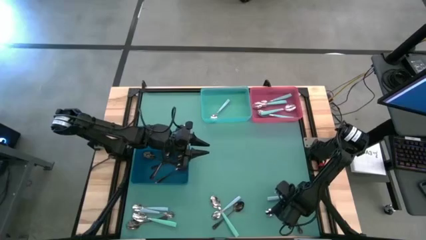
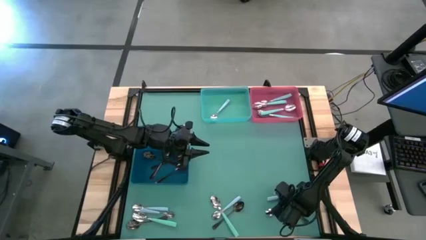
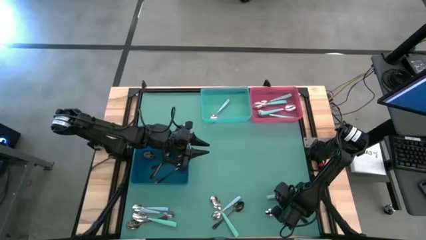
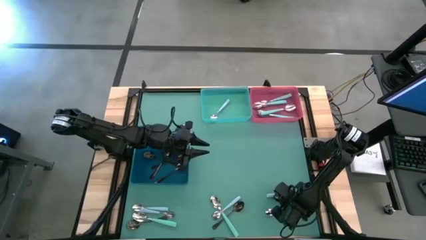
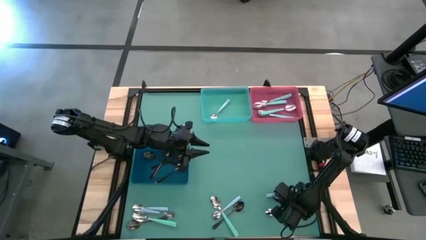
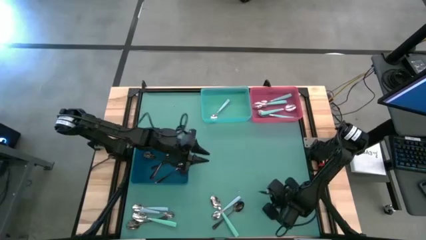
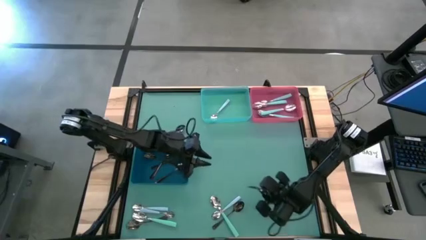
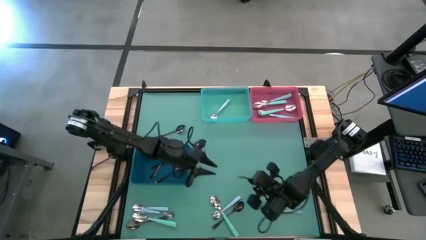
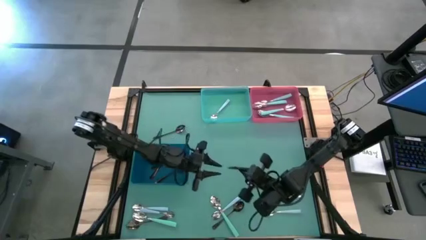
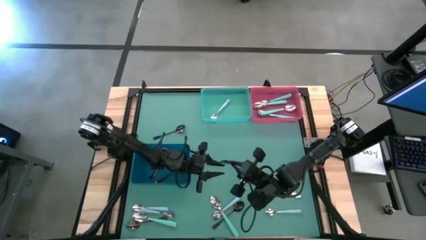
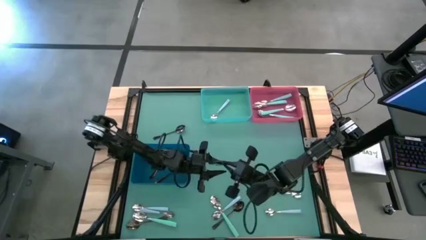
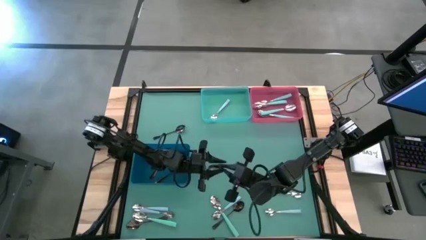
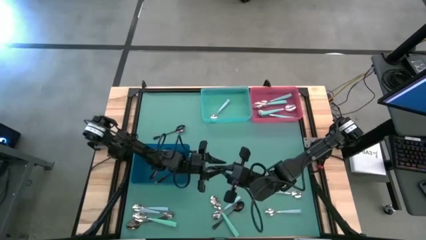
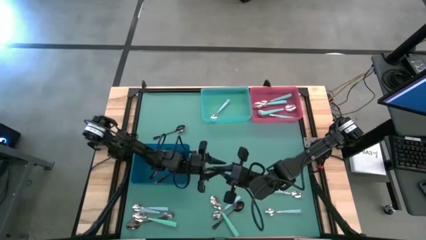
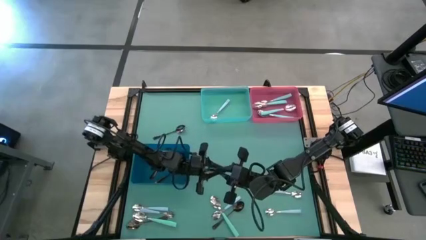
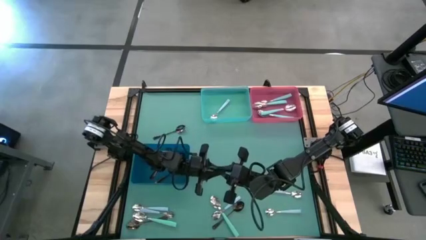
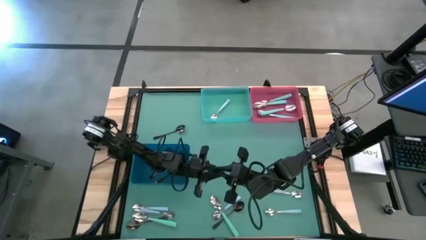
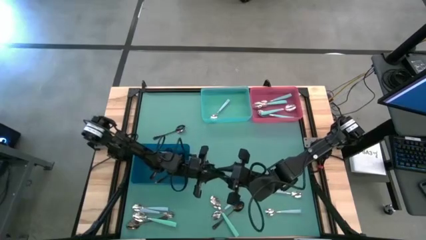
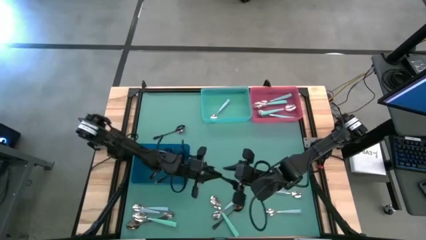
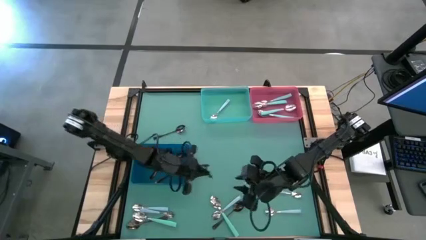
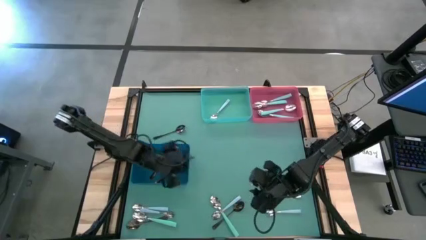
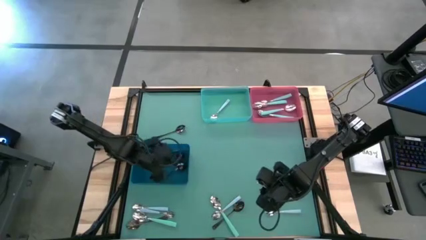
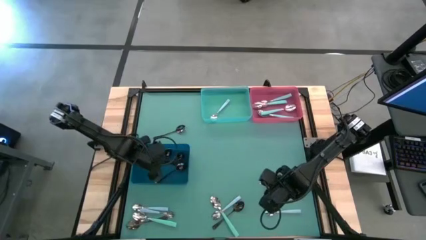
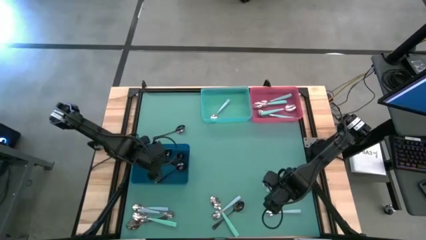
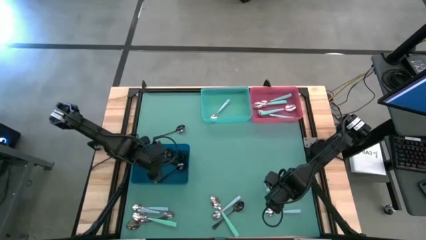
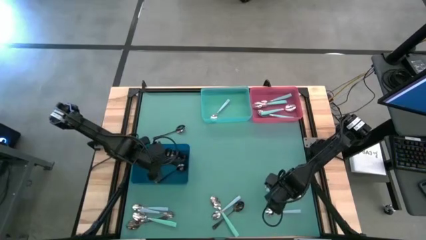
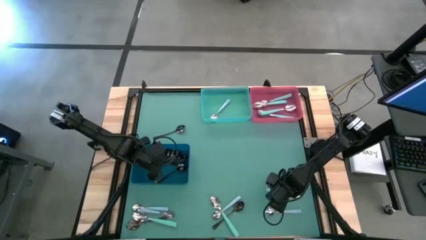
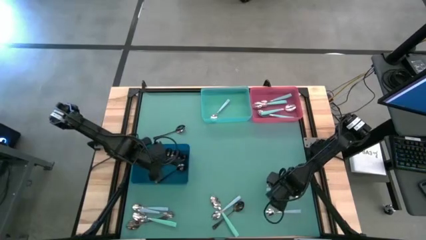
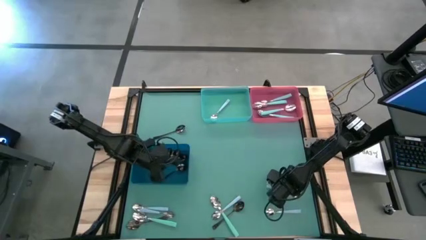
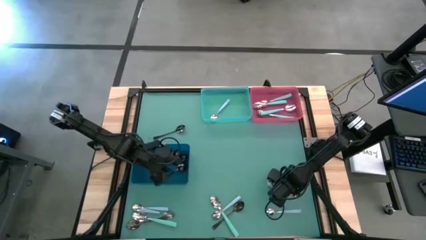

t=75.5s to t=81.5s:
Task: Sort silverware by color (type)
Put the bottom right black spoon into the dark blue bin

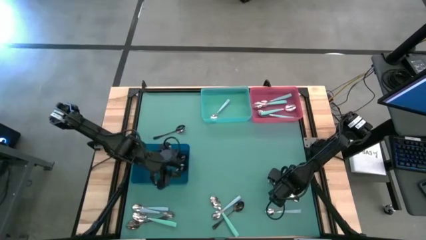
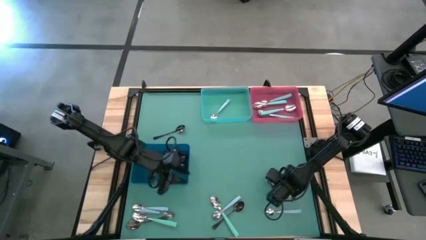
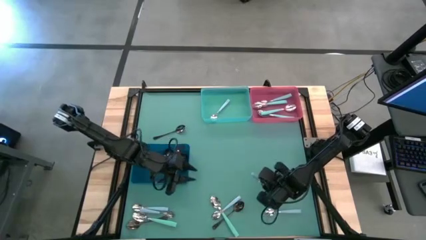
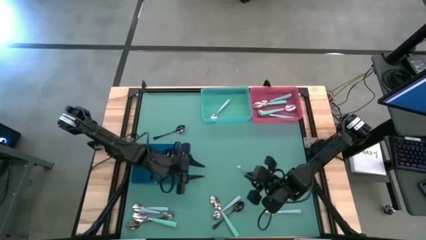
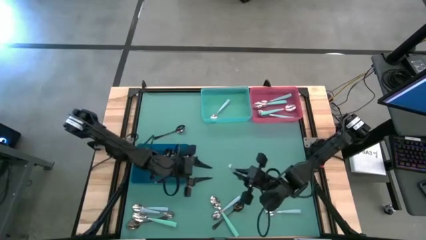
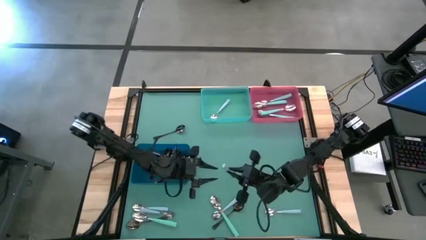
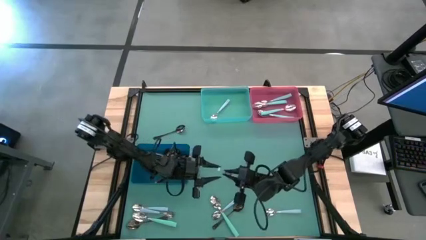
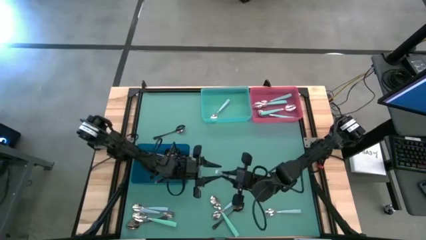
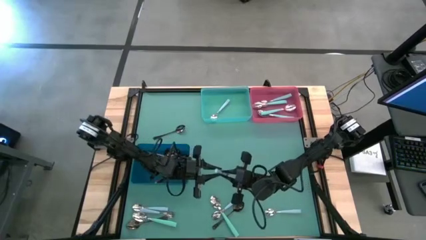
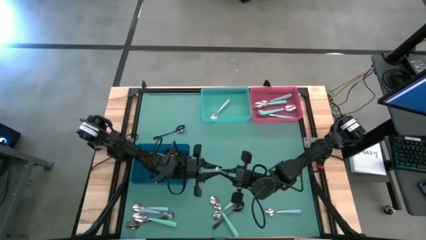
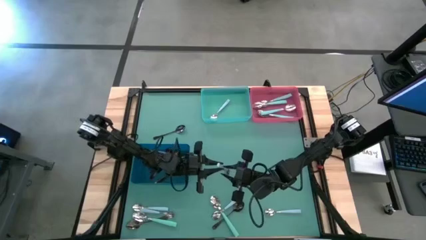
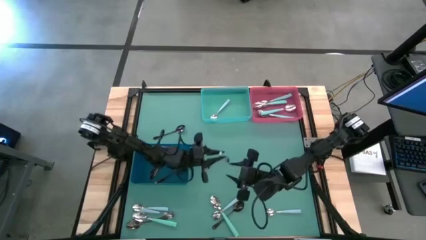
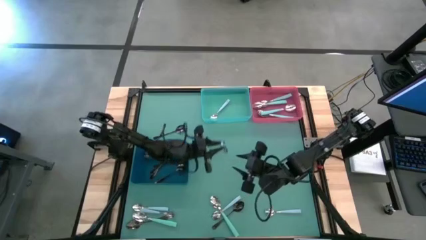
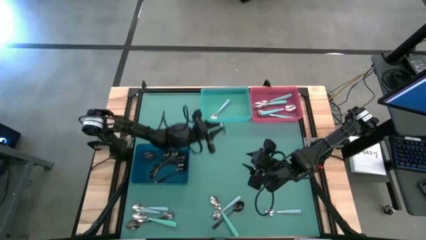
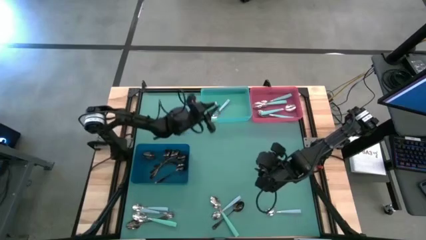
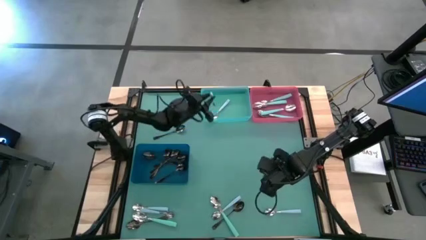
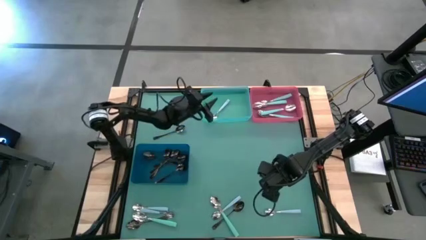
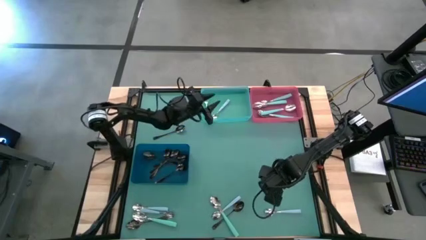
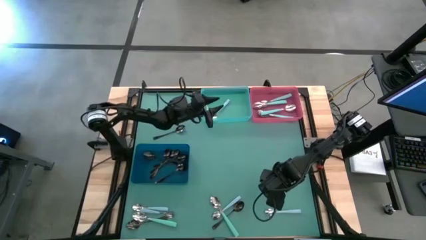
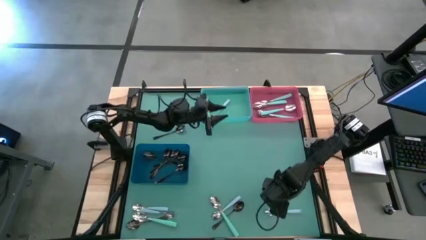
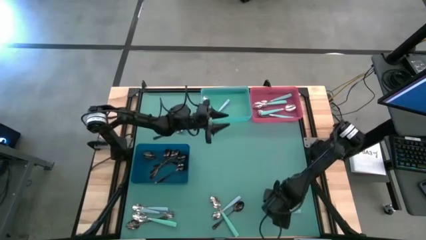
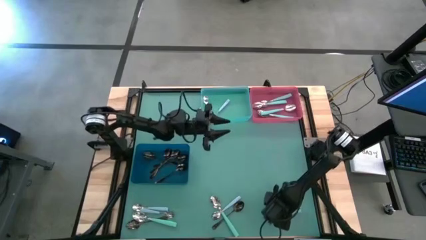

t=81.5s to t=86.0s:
Put the bottom right blue spoon into the light blue bin

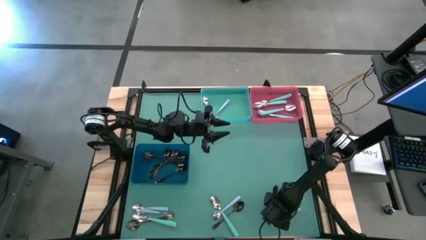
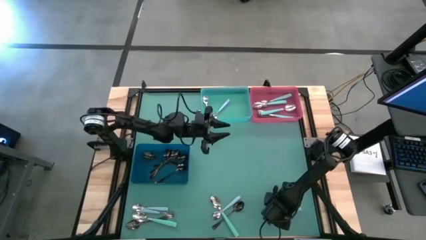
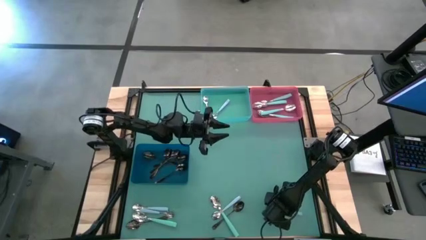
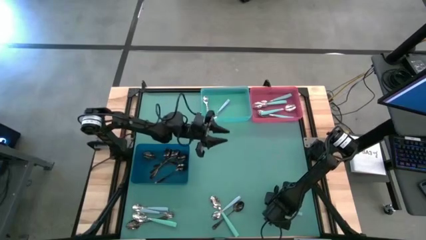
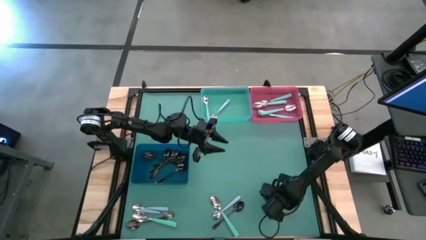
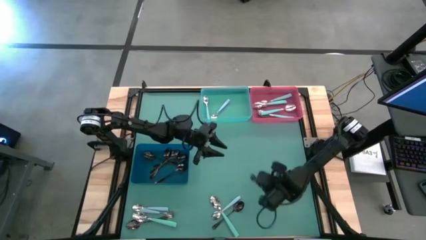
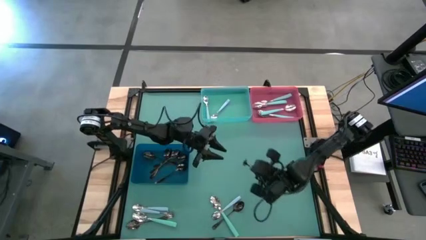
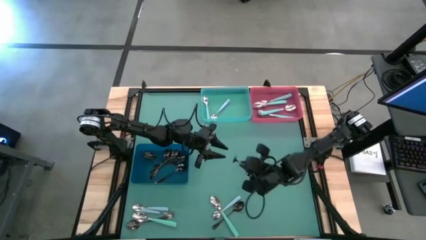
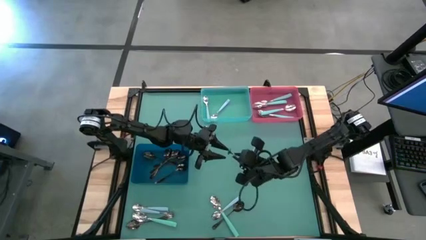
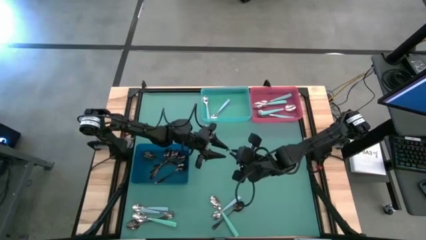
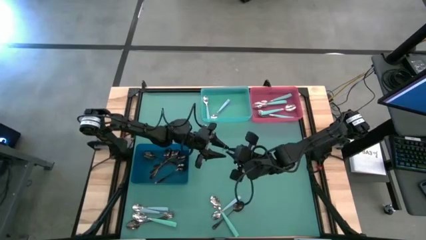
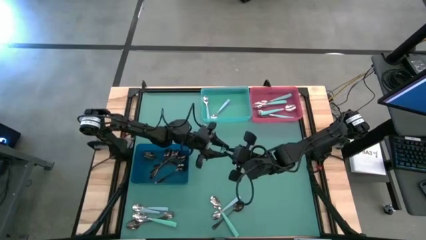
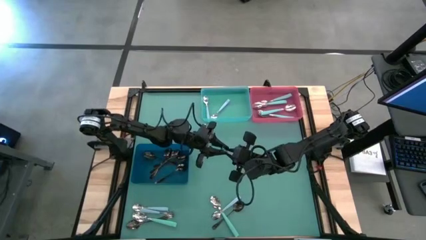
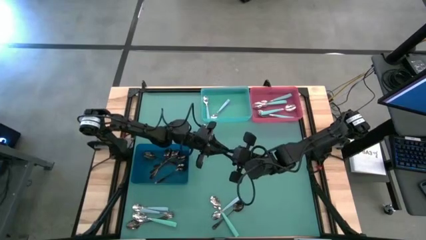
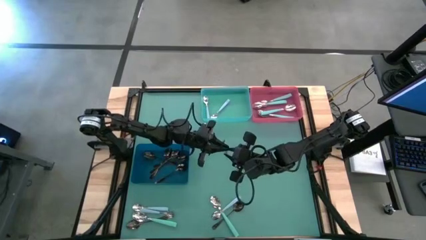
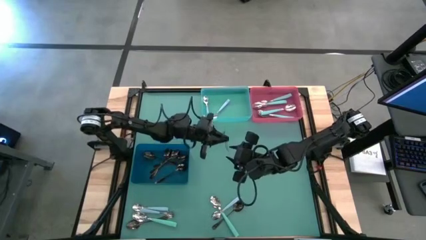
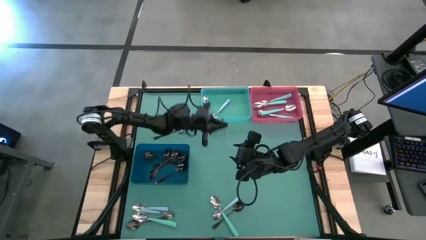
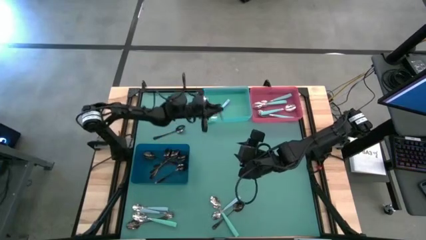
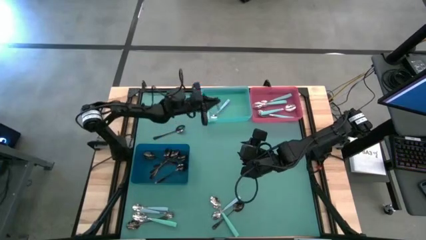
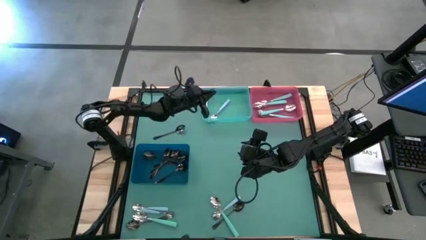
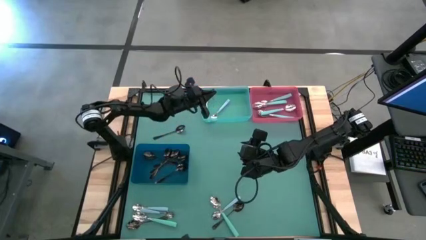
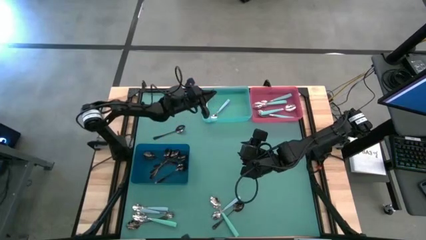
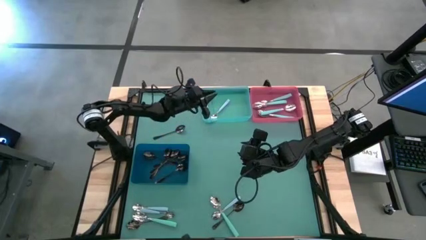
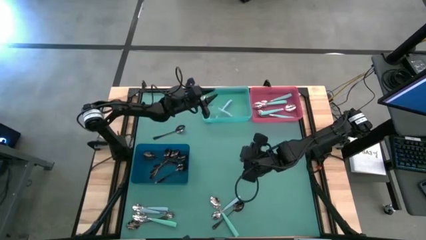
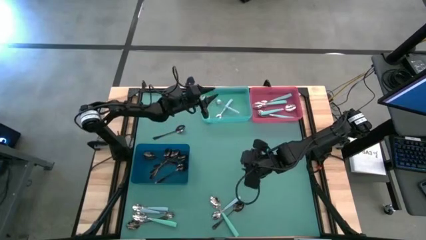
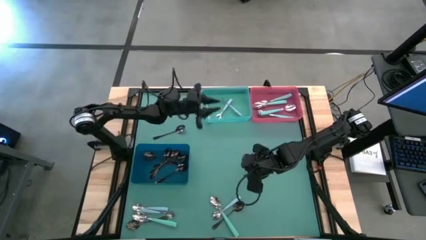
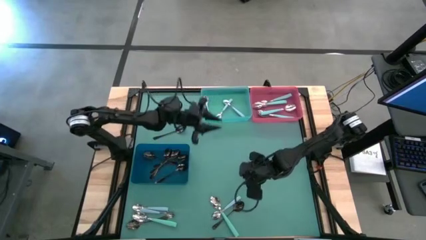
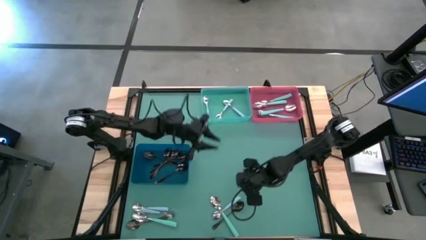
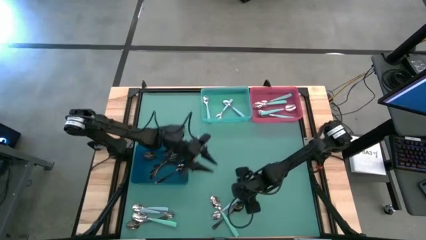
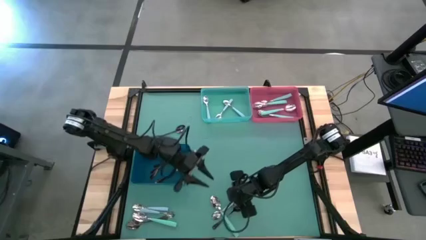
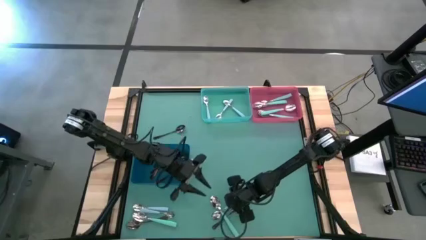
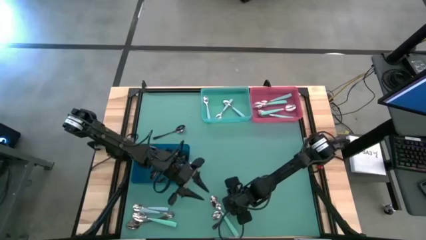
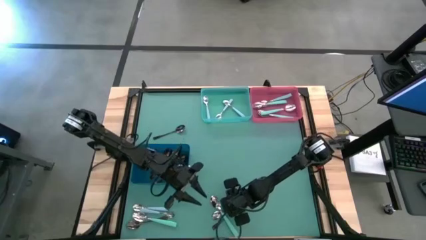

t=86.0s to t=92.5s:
Put the bottom right blue spoon into the light blue bin
